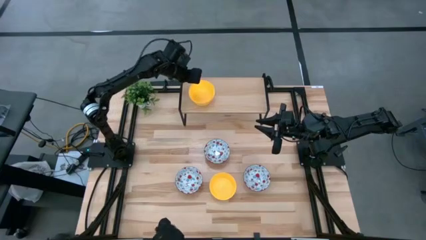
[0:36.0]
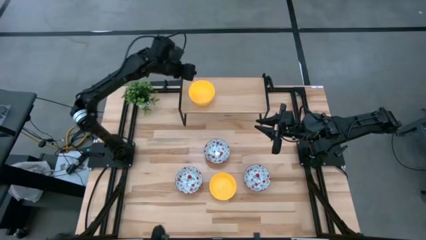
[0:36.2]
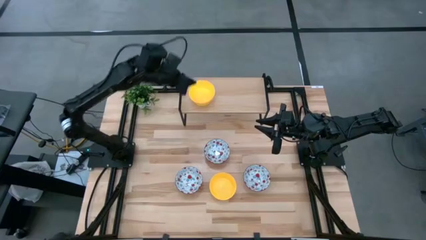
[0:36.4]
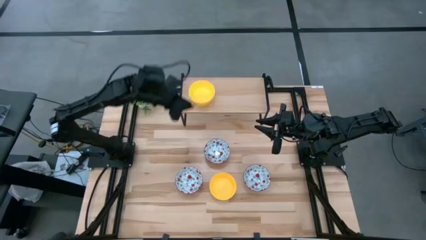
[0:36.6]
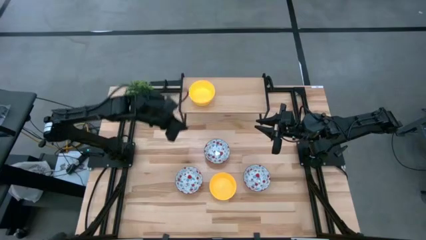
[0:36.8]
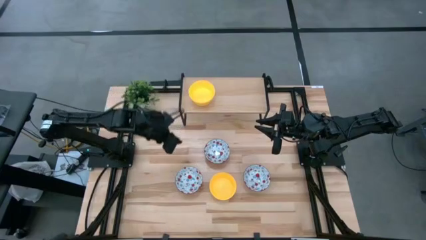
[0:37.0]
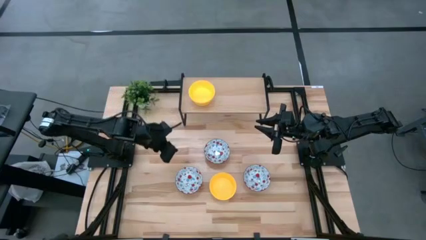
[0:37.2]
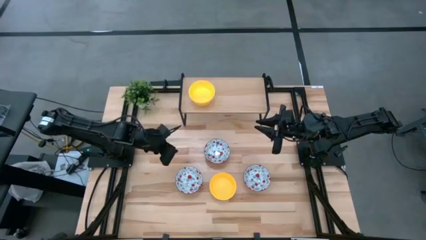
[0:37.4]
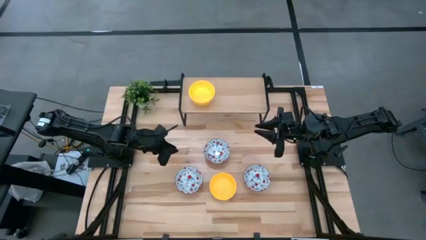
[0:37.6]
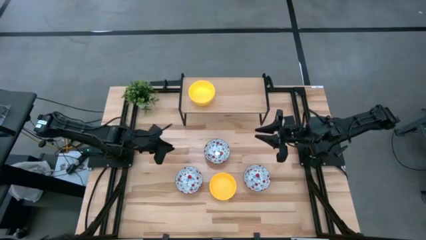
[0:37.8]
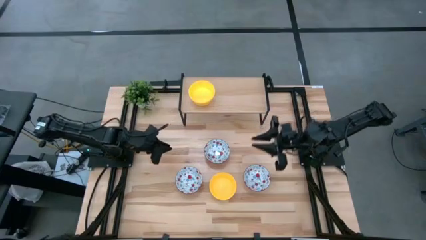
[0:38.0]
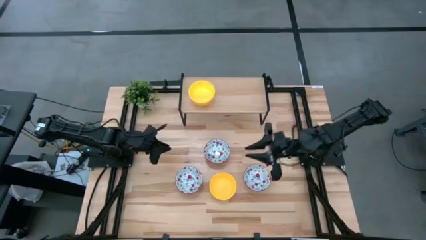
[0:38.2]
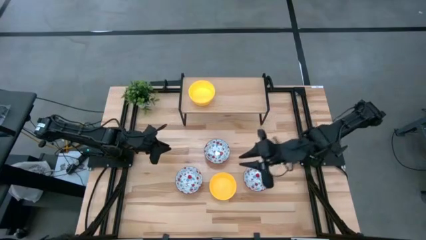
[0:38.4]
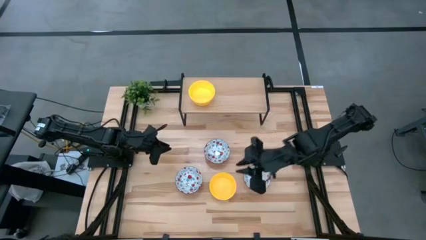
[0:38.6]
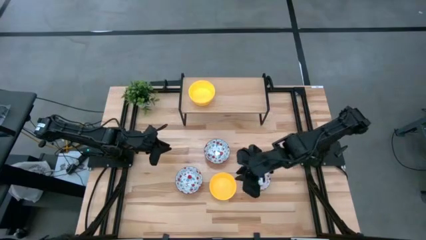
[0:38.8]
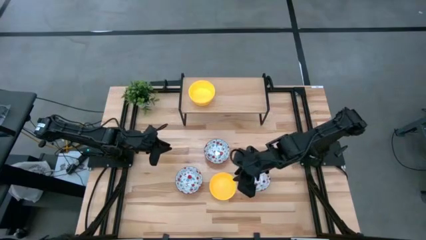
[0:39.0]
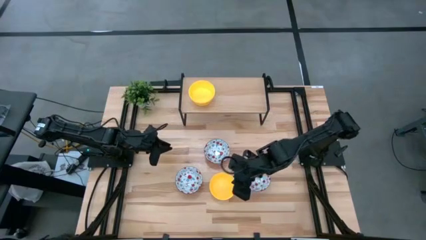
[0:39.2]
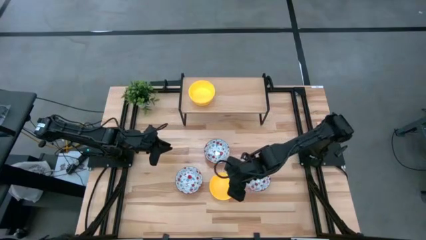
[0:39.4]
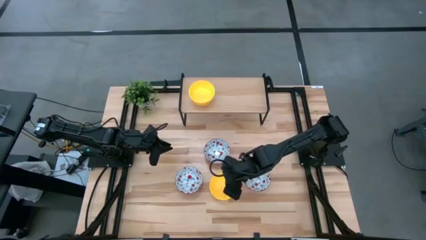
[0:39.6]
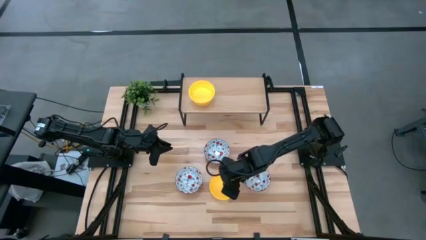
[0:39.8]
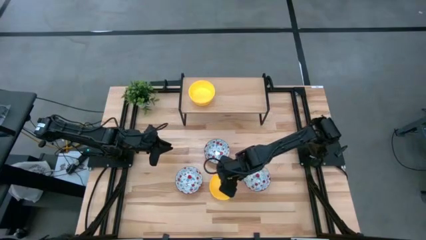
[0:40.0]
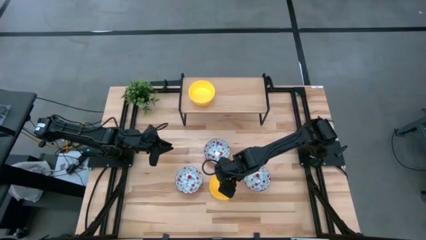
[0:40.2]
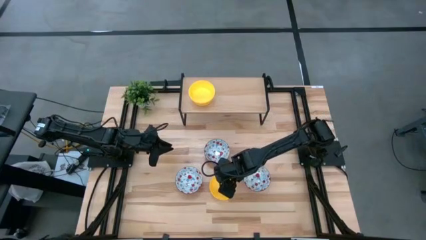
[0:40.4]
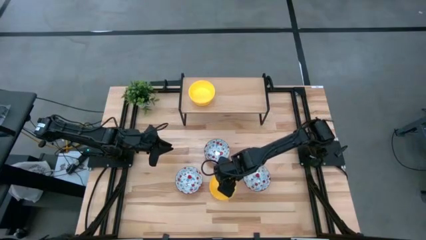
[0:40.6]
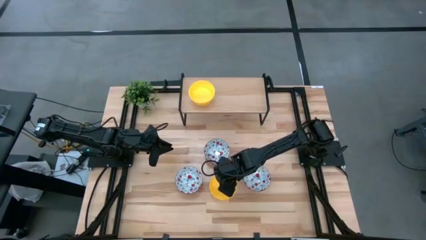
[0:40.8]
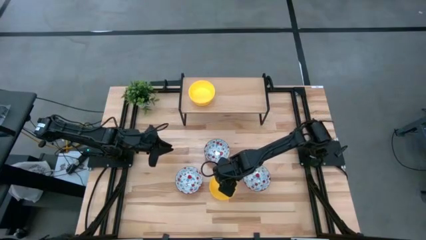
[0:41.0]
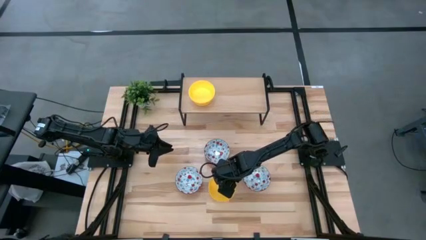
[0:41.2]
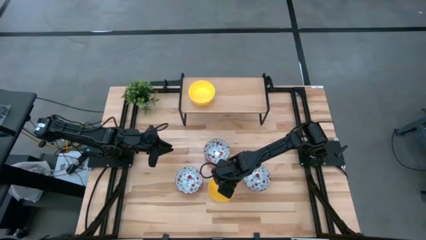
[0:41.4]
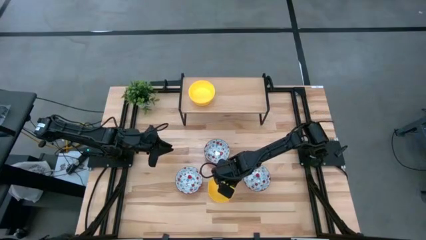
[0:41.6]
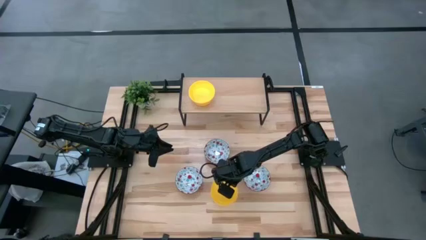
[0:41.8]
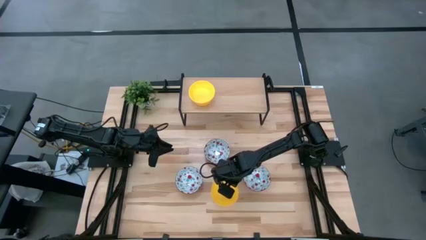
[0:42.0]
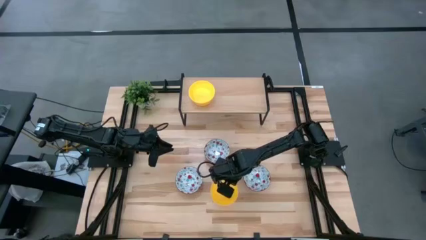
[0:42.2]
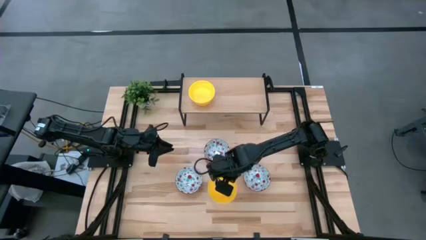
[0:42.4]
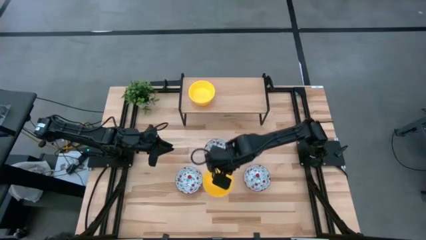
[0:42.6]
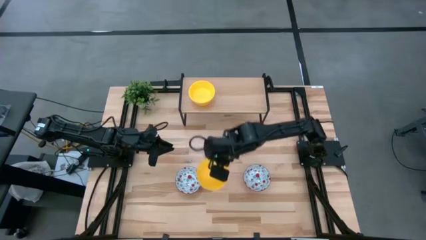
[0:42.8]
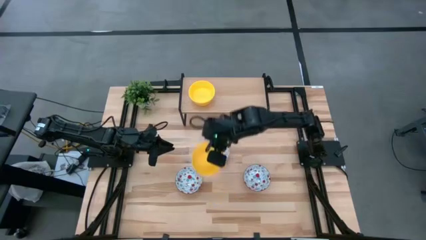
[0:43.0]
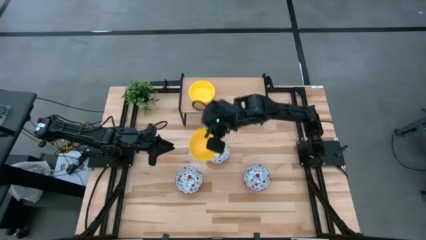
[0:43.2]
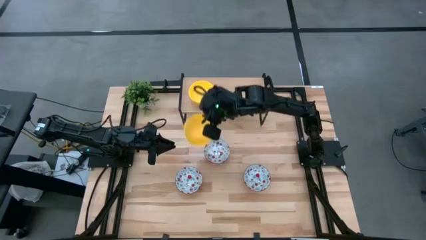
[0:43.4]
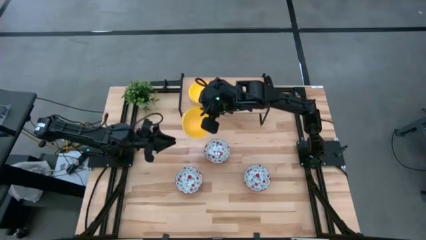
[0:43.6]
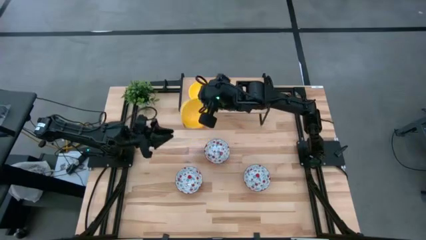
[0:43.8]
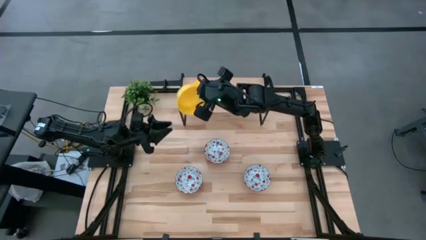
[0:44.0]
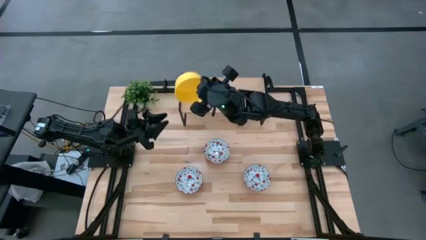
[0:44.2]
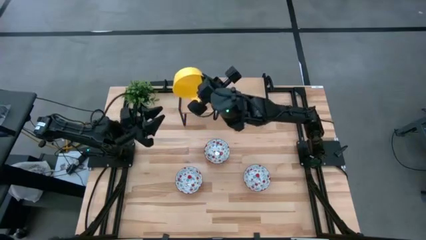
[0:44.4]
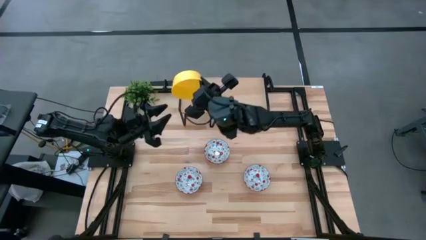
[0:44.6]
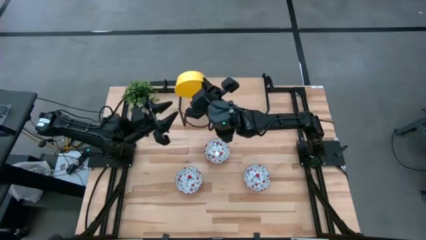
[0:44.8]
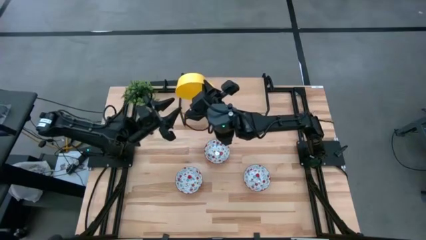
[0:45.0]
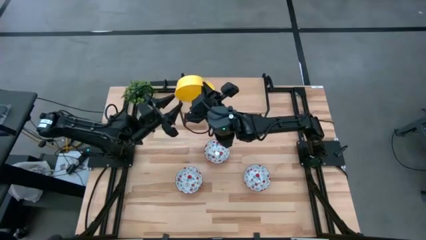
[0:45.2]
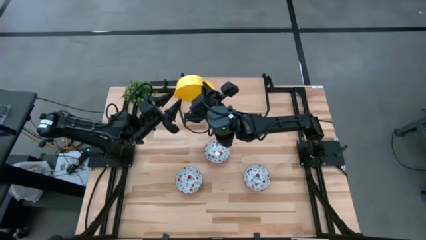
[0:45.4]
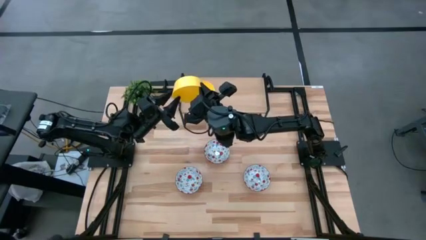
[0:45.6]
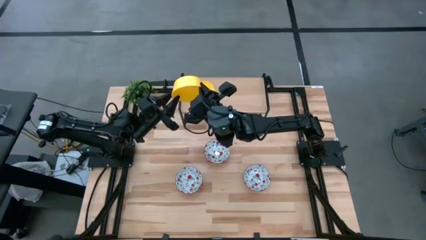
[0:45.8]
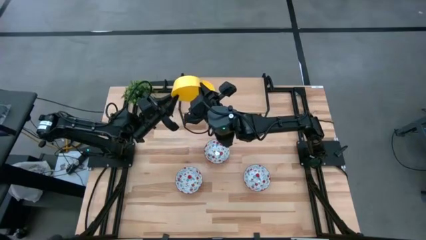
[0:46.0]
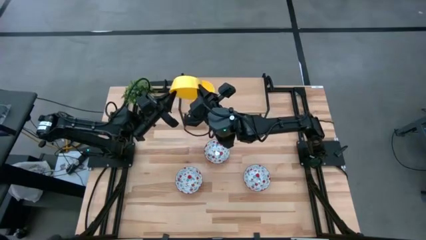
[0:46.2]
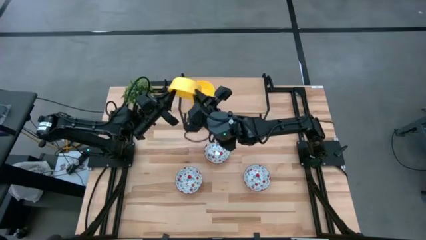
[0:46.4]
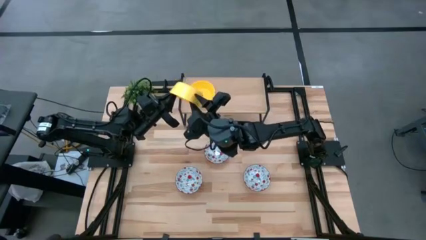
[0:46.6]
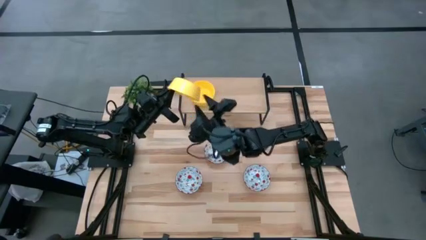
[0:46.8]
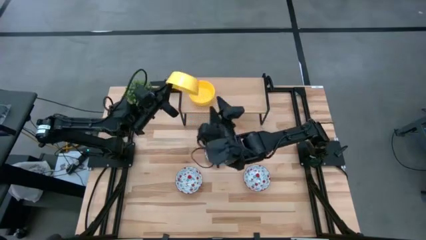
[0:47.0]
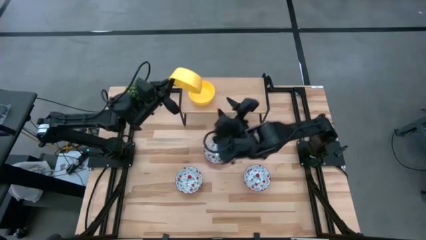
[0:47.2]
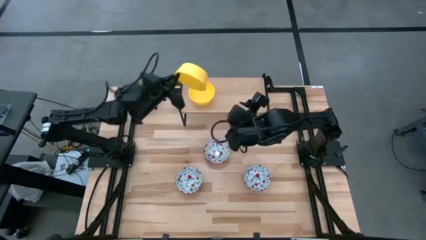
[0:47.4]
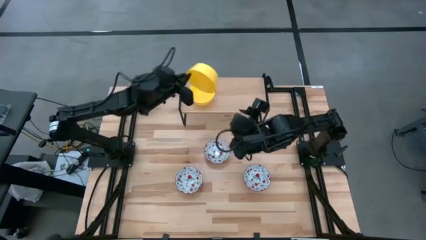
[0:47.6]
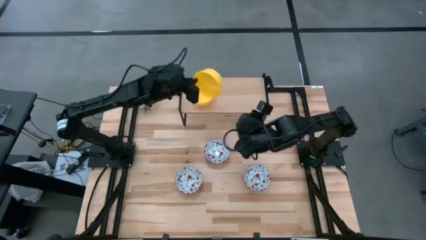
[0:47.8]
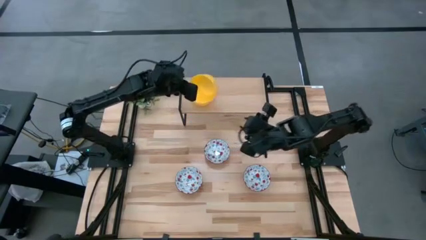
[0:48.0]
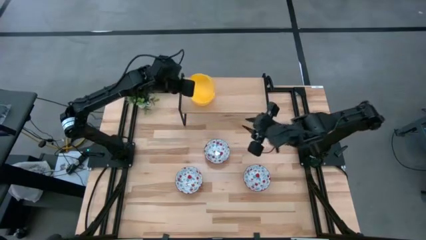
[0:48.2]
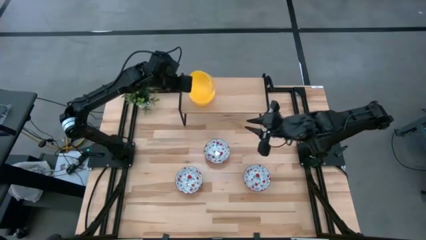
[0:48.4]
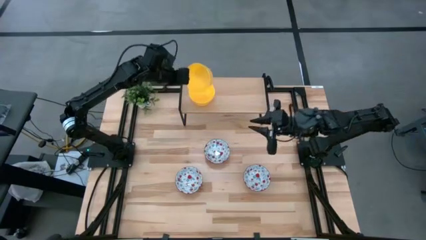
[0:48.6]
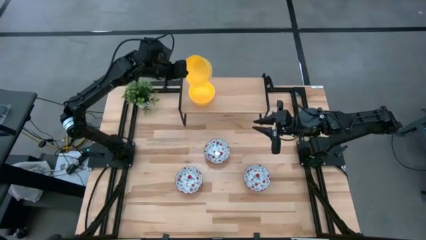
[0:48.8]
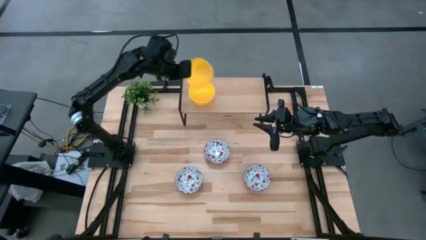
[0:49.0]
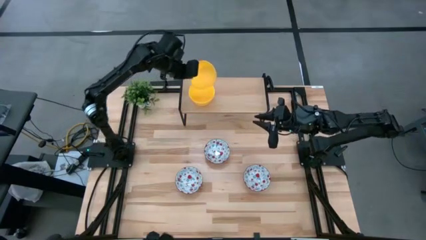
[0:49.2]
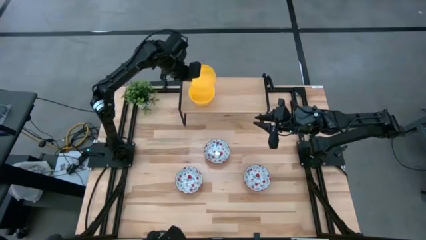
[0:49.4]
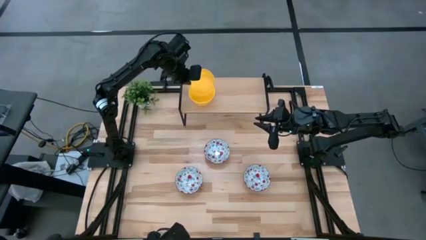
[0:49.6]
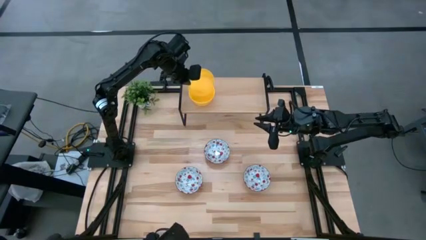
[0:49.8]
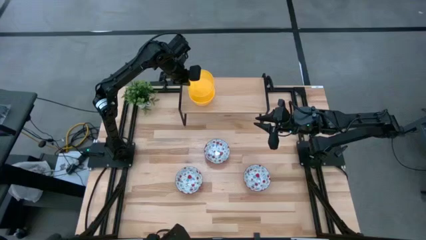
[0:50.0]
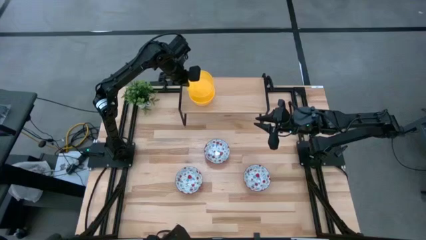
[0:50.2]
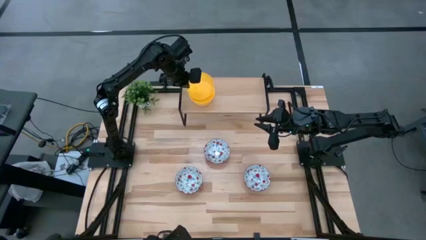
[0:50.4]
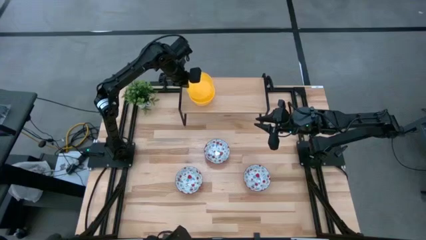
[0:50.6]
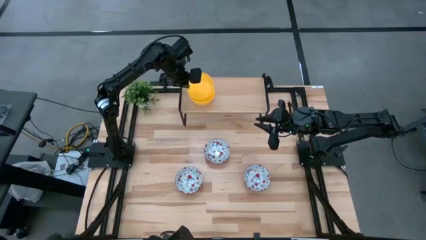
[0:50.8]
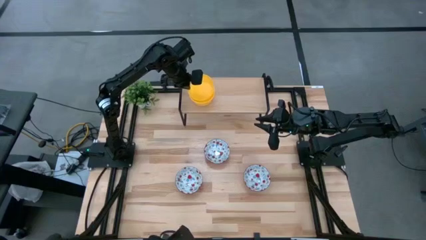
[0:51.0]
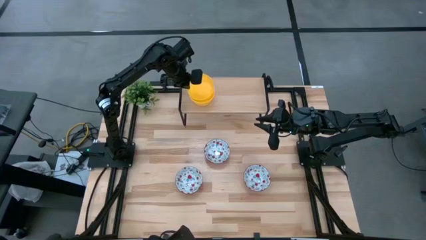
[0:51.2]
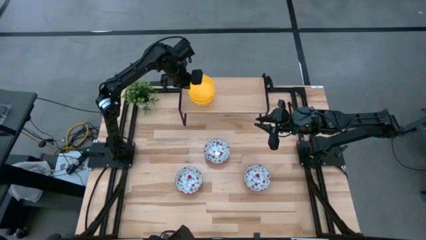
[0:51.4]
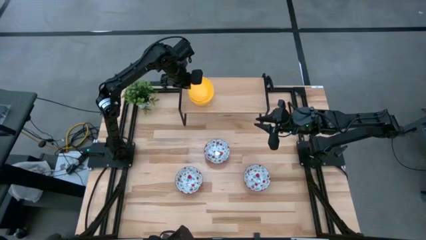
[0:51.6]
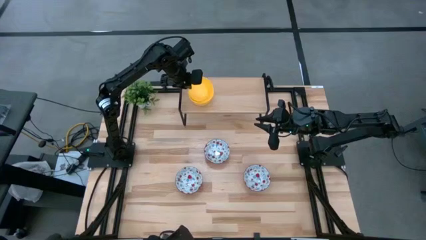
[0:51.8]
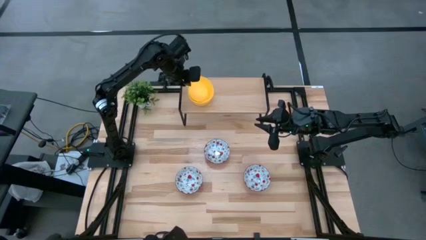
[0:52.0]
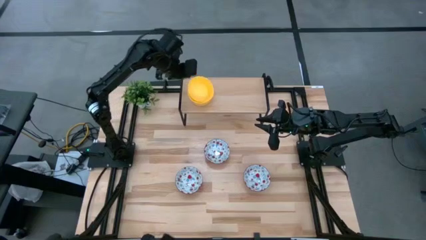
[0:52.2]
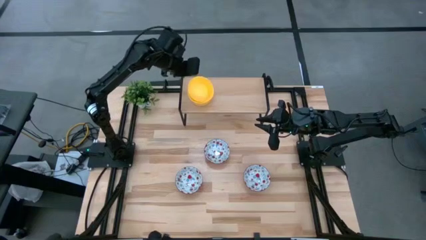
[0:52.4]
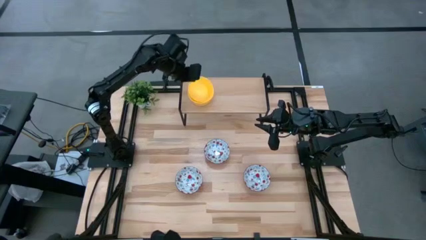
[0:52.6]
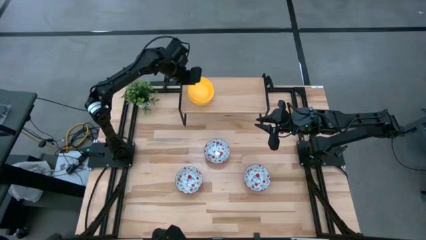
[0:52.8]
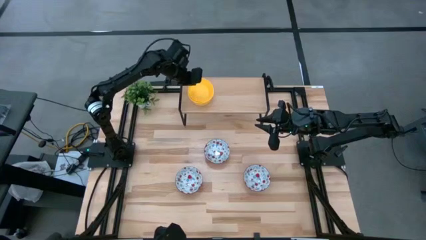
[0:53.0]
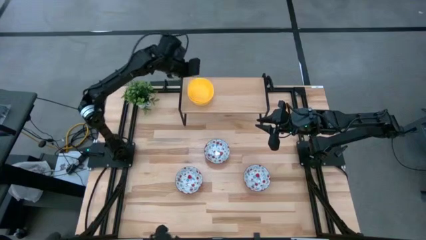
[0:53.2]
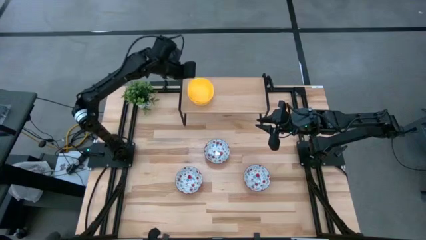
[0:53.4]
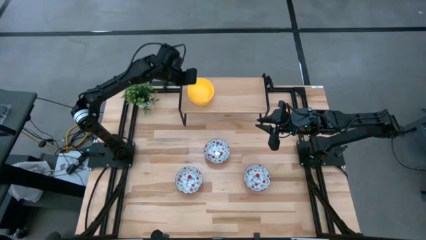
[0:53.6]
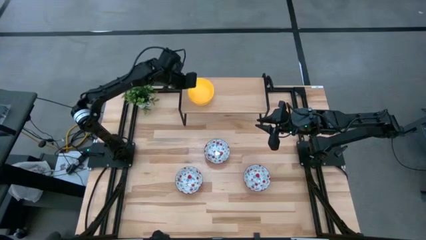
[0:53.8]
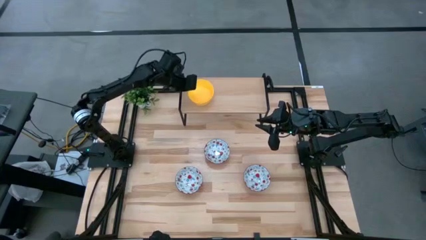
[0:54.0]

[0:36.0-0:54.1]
Task: Pick & Place Mini bowls
Stack the yellow bowl on top of the yellow bowls on the shelf
